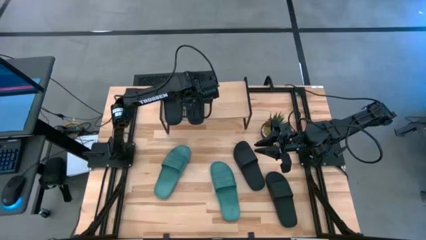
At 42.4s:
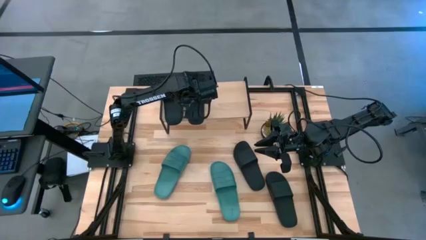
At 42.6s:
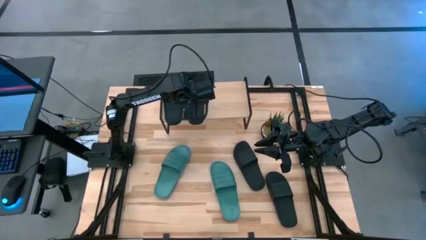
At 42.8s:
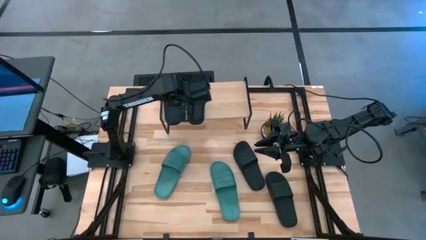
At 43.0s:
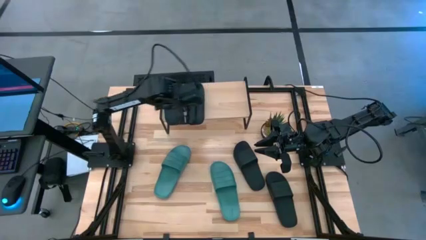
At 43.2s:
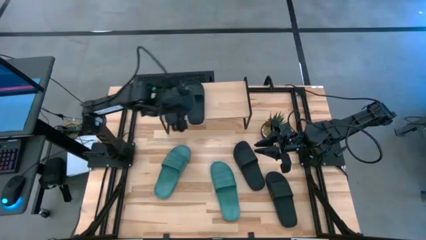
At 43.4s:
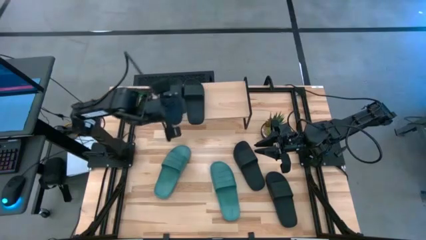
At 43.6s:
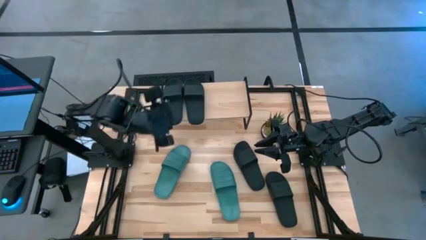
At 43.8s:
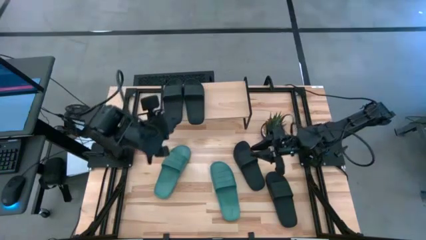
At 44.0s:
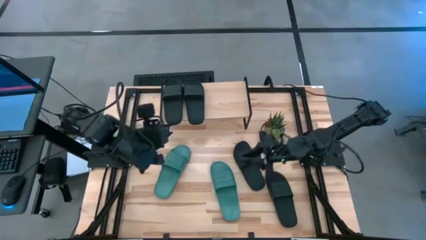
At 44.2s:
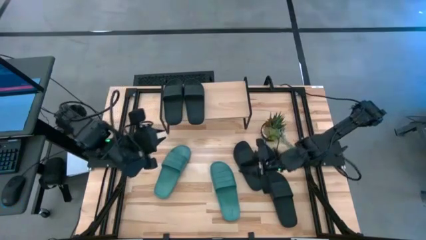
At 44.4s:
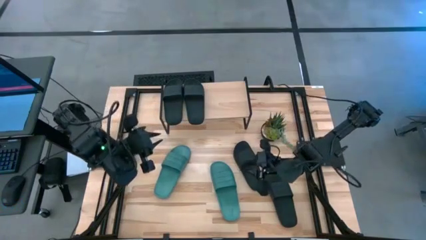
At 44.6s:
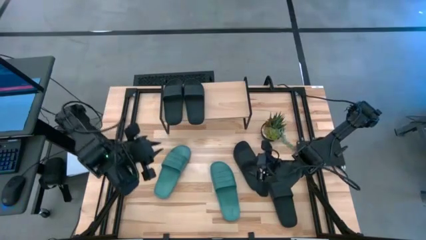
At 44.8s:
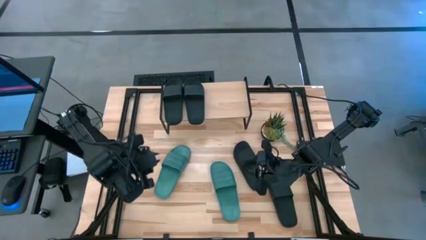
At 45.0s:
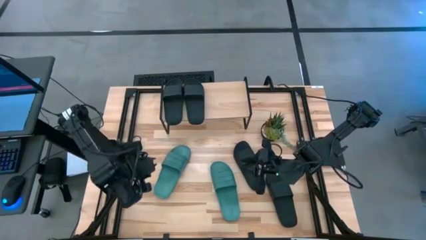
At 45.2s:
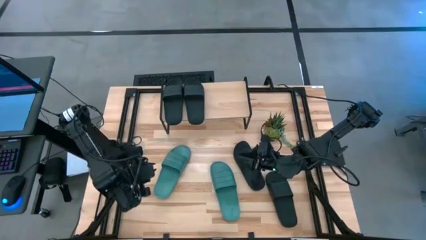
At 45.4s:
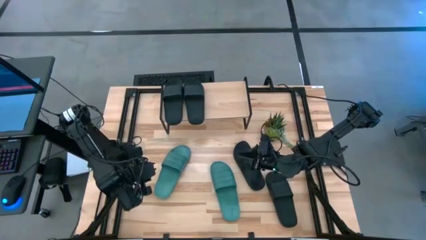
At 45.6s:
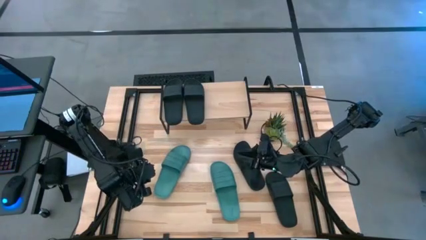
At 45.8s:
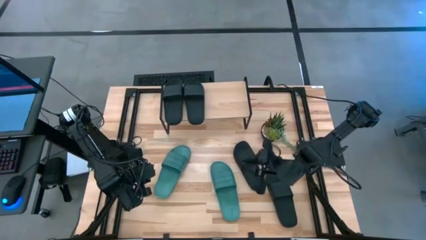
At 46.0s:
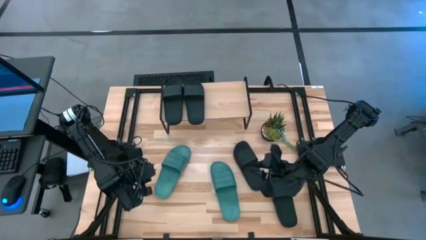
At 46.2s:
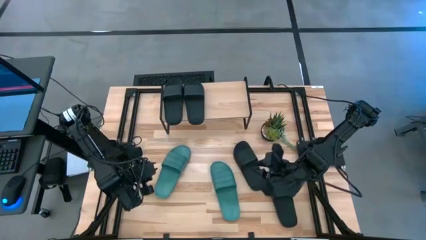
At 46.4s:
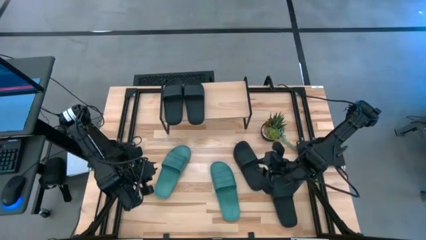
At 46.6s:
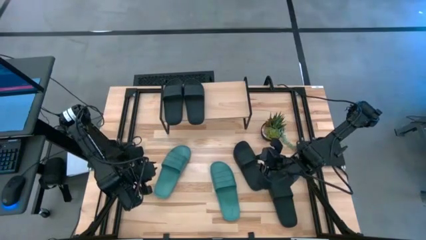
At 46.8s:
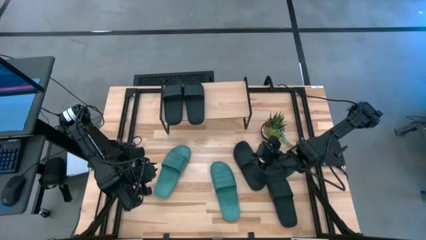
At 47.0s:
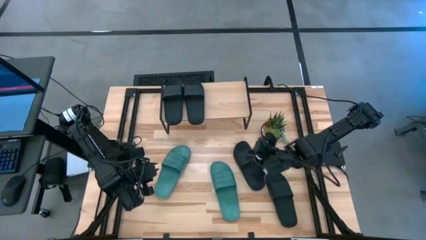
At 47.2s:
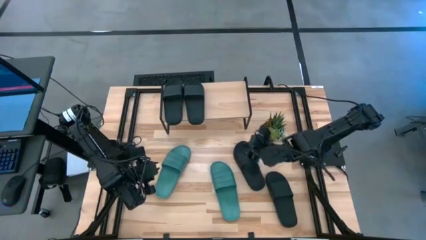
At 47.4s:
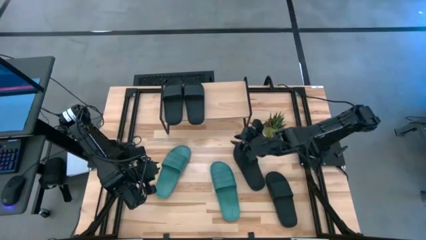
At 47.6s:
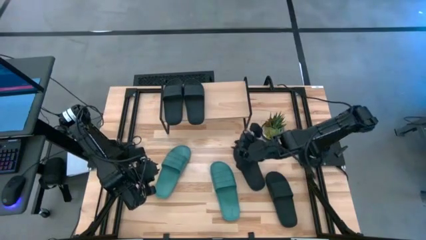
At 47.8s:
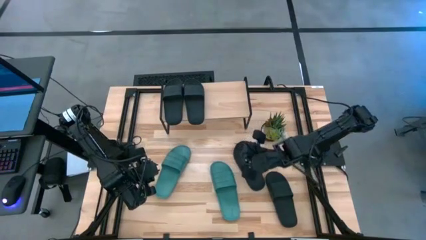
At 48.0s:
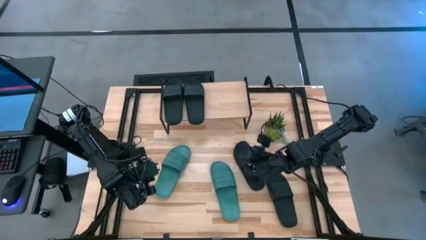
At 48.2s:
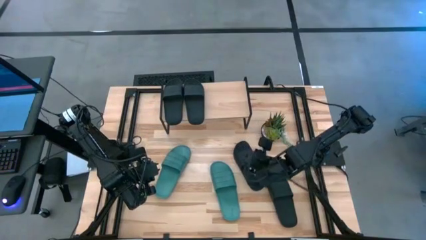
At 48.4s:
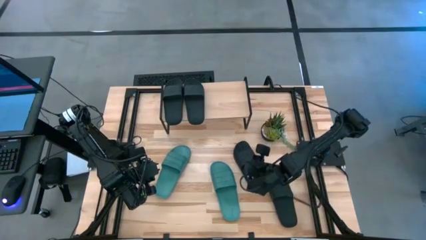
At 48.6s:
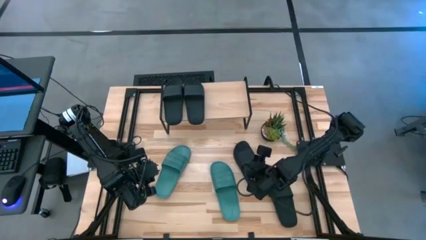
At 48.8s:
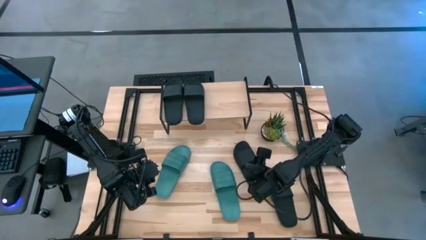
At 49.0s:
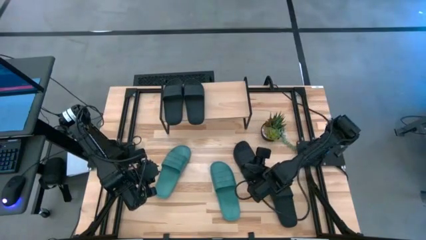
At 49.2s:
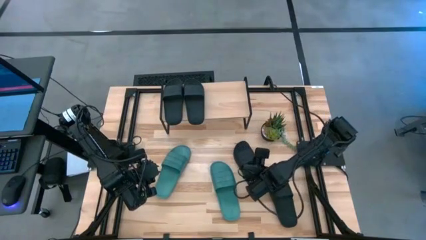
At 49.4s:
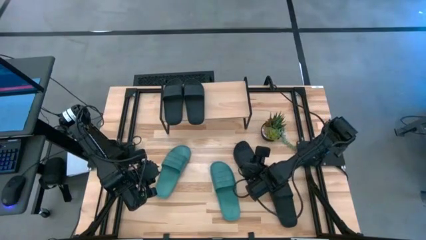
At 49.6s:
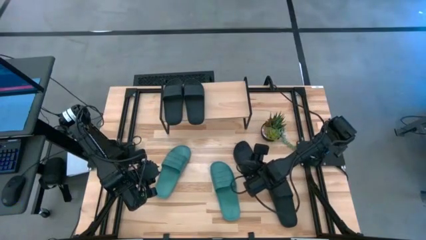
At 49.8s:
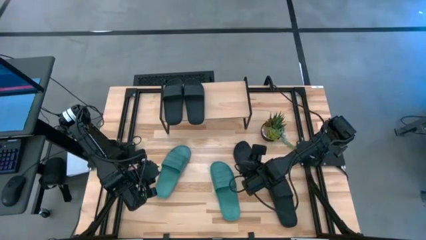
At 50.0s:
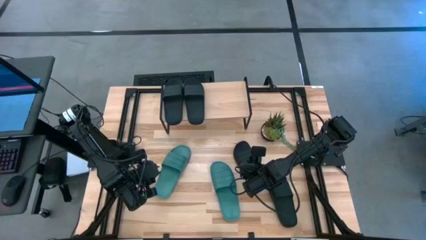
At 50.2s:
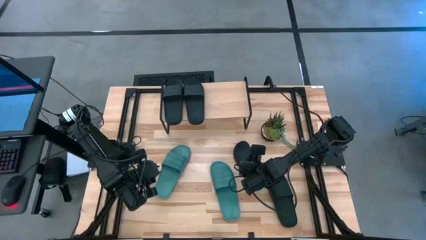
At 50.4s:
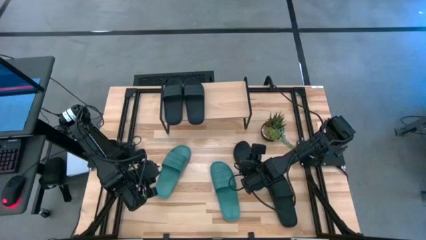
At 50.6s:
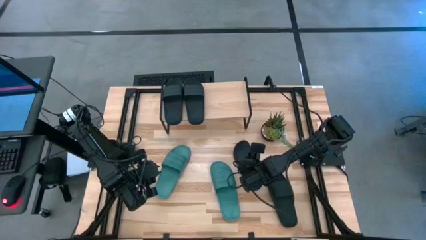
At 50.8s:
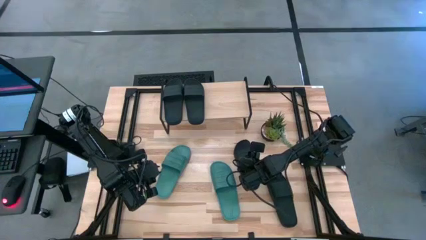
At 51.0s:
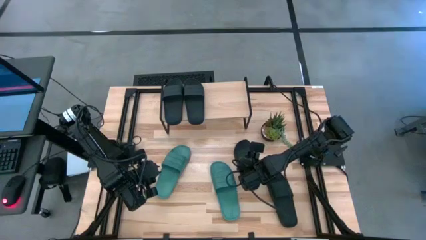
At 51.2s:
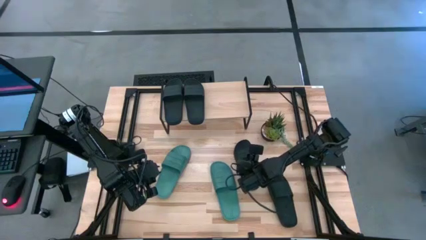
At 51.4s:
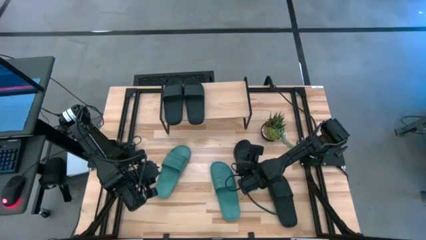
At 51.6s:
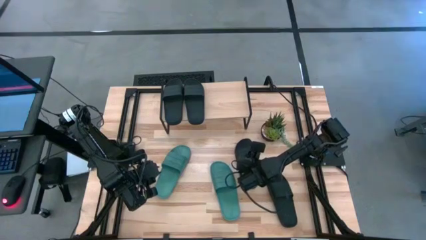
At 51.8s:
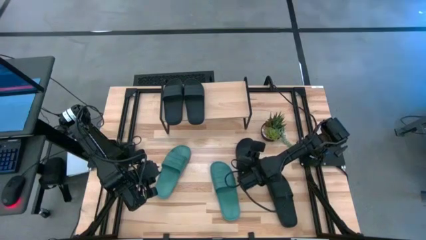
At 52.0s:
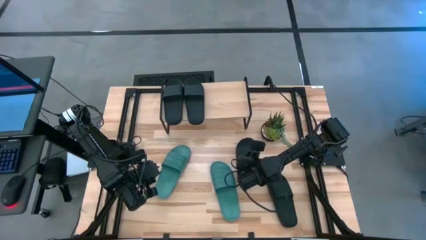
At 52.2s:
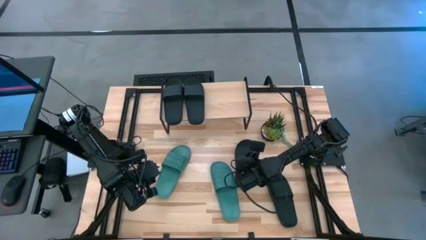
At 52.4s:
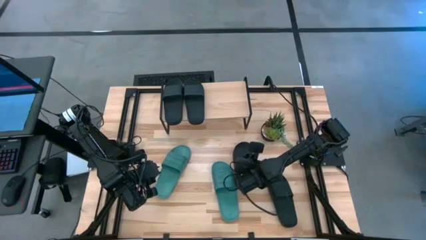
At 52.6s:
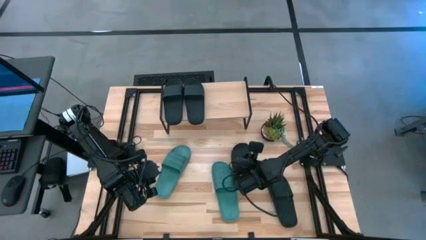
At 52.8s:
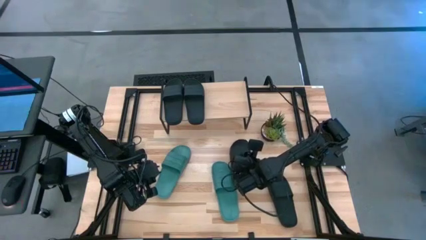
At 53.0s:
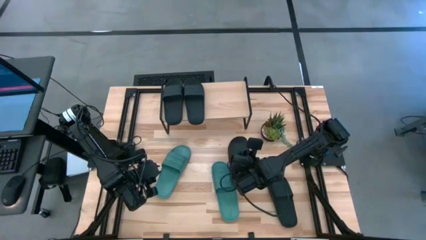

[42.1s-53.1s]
Task: Pick and place slides into the shelf
Put the black slide on the shelf

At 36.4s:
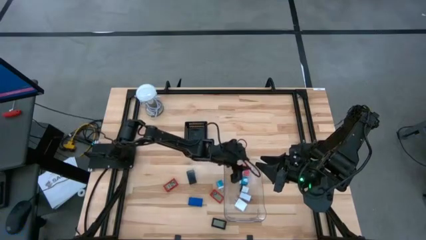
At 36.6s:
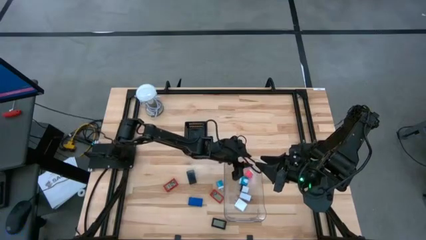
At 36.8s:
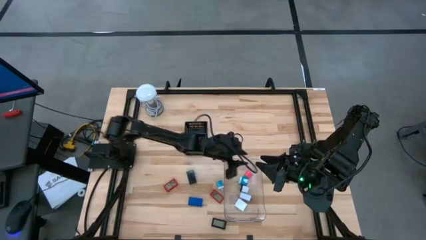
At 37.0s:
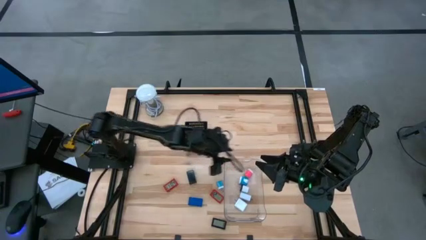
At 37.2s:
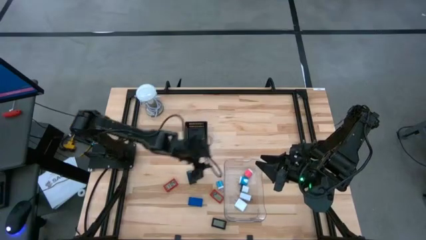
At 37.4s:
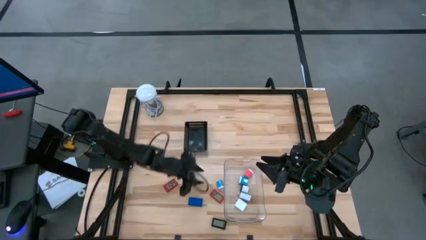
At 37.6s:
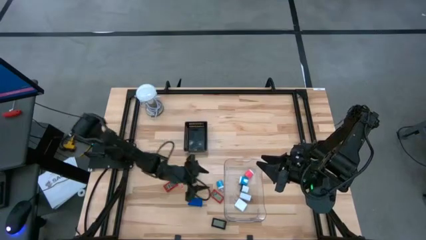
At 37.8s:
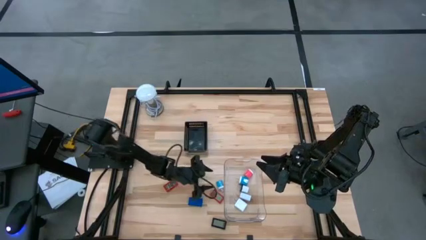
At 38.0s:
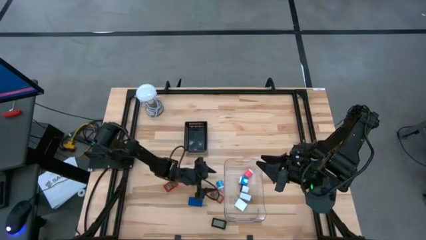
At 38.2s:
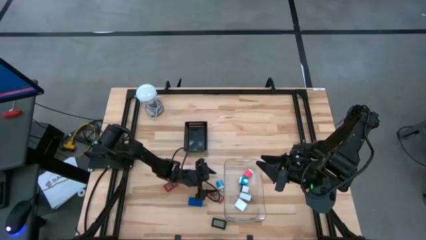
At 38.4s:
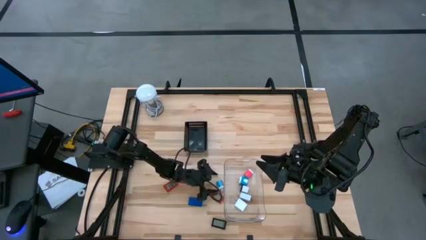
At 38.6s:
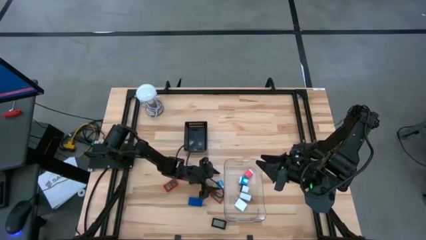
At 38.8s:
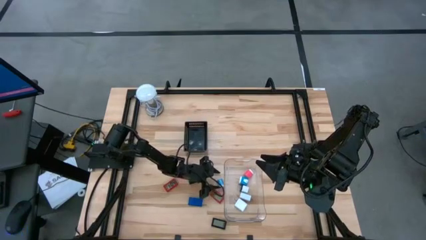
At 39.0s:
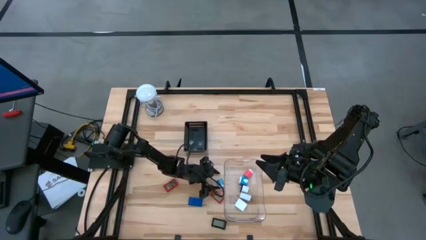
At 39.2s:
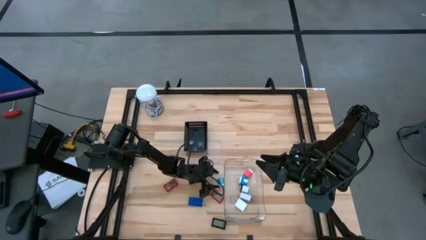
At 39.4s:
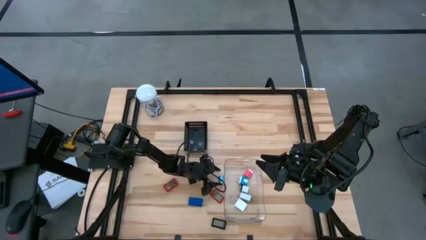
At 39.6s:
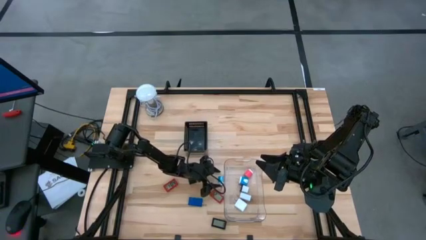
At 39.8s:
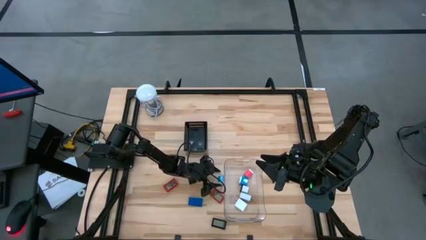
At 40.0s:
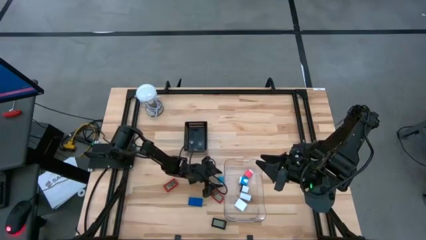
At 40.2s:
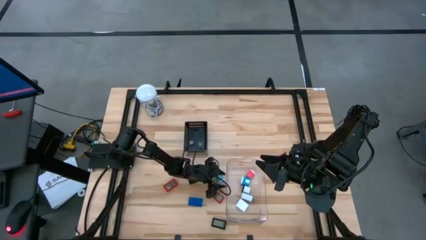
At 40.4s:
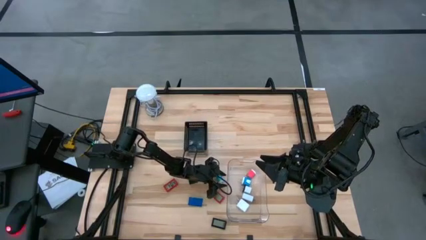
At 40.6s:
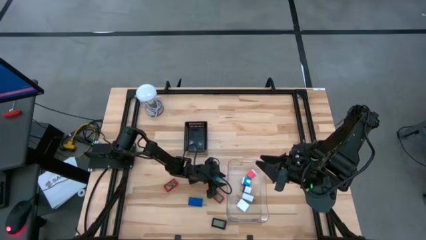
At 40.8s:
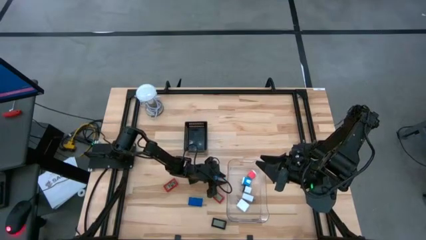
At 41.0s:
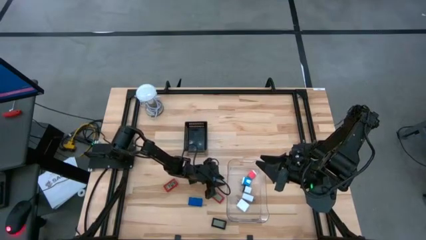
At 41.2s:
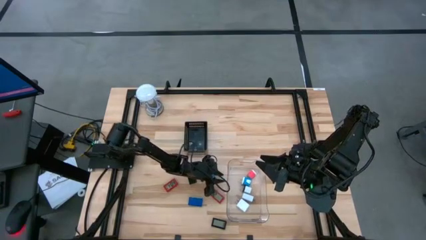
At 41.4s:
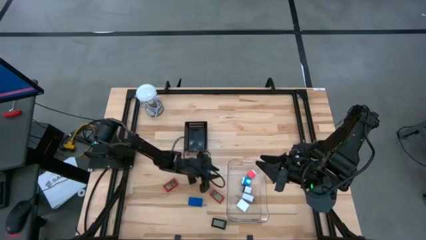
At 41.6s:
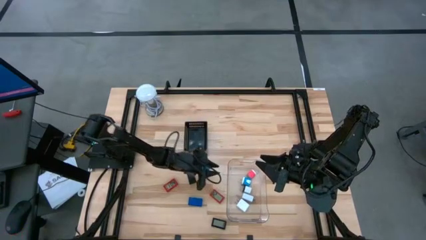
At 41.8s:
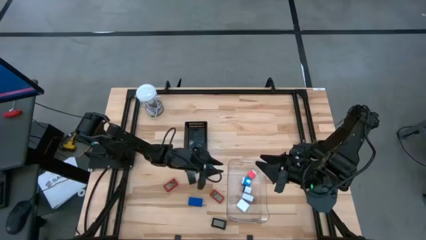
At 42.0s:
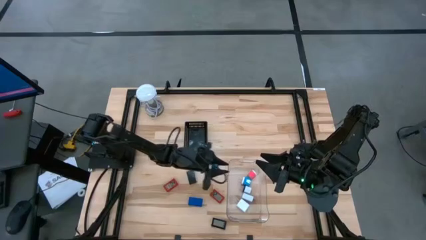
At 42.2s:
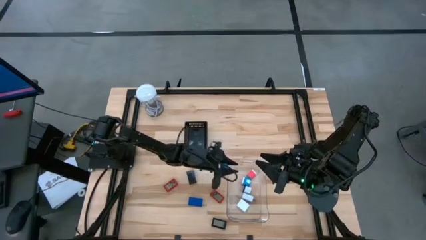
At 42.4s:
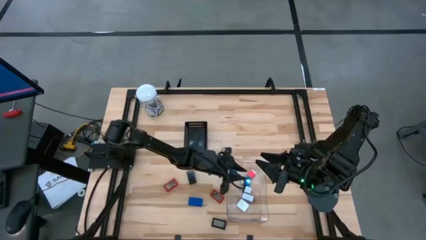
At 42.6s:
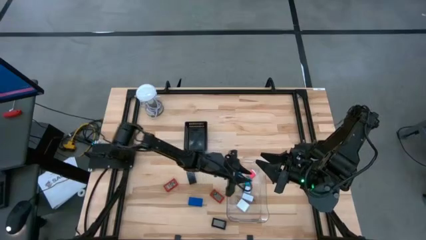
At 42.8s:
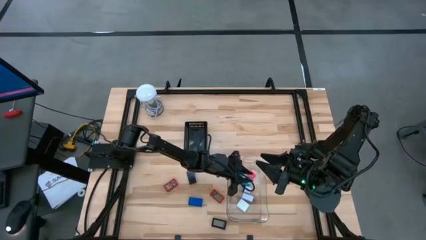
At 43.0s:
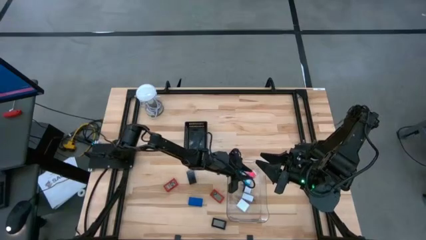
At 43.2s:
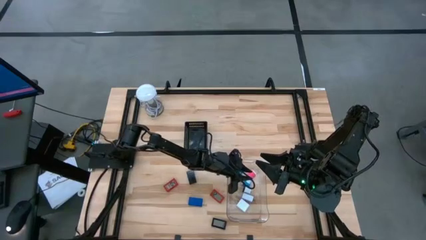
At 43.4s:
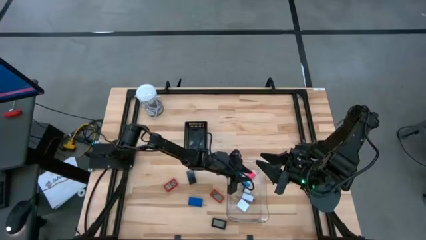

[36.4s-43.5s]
Task: Pick & Place Office items
Put the blue charger adapter into the transparent bin
